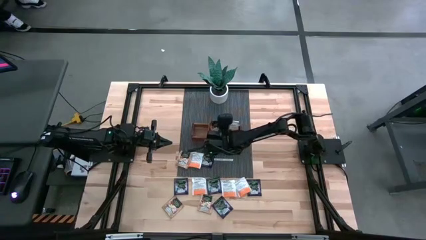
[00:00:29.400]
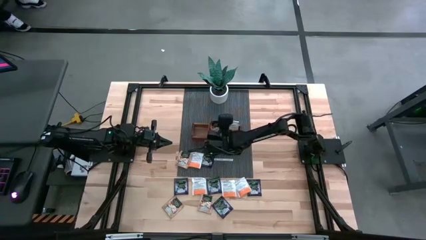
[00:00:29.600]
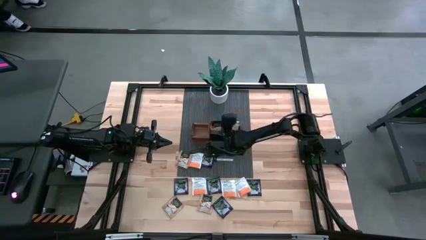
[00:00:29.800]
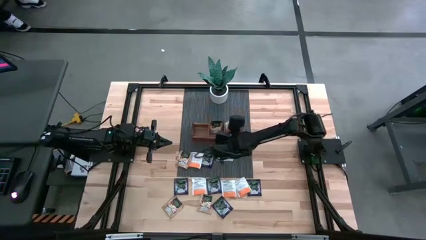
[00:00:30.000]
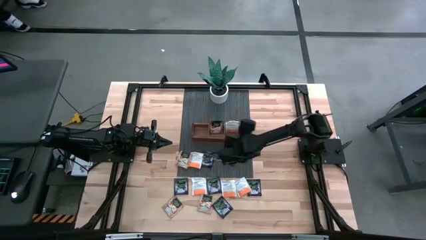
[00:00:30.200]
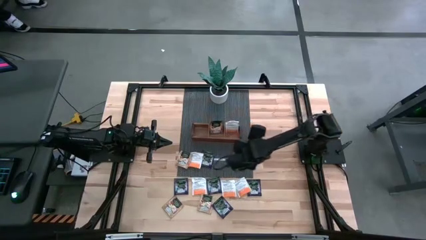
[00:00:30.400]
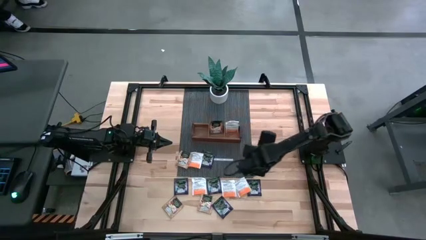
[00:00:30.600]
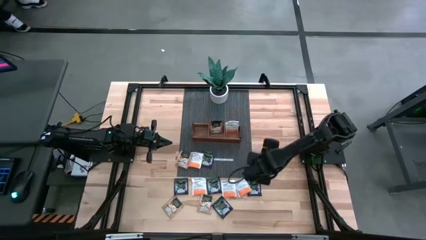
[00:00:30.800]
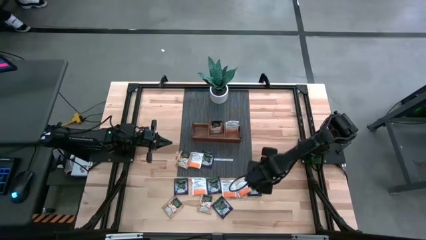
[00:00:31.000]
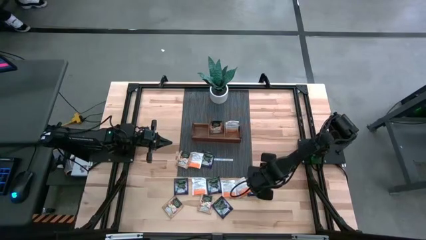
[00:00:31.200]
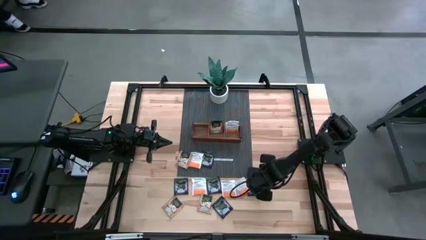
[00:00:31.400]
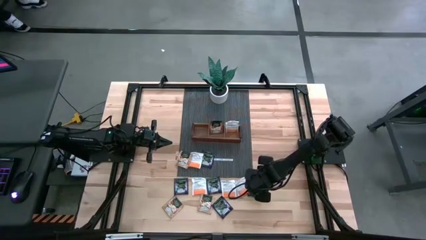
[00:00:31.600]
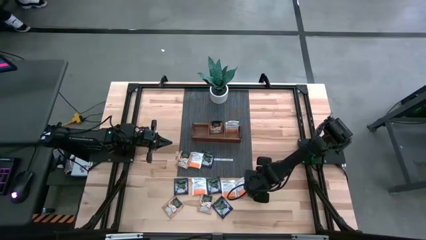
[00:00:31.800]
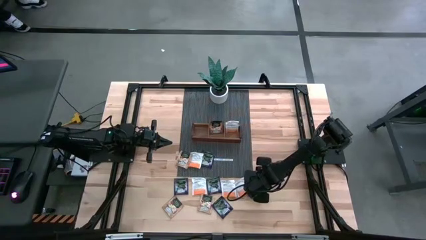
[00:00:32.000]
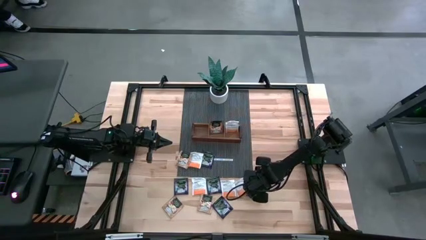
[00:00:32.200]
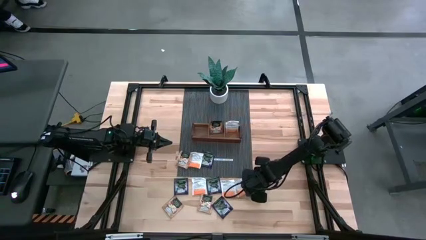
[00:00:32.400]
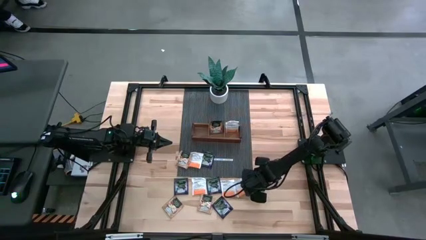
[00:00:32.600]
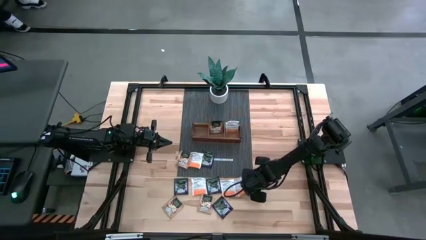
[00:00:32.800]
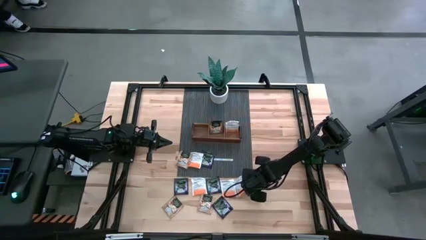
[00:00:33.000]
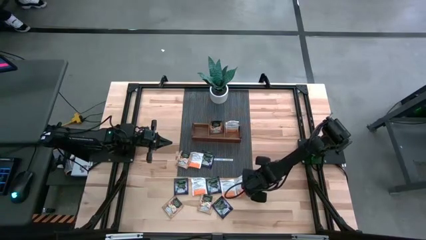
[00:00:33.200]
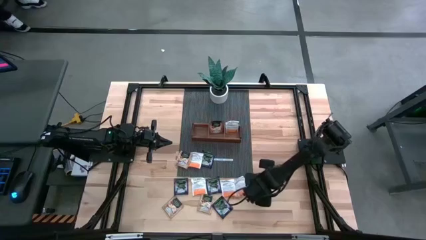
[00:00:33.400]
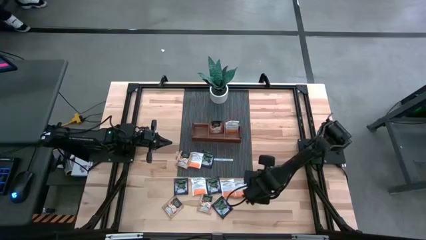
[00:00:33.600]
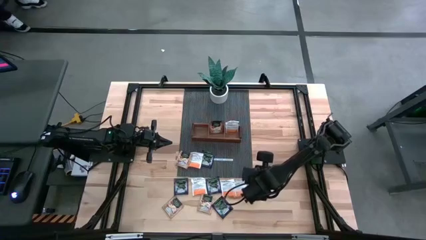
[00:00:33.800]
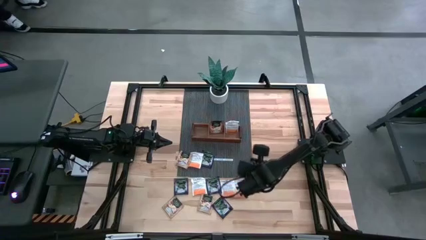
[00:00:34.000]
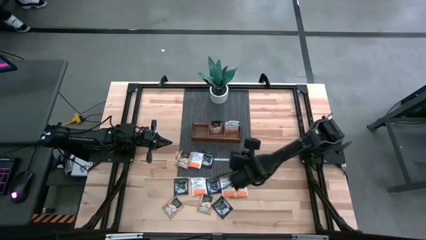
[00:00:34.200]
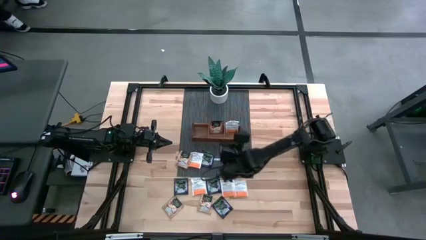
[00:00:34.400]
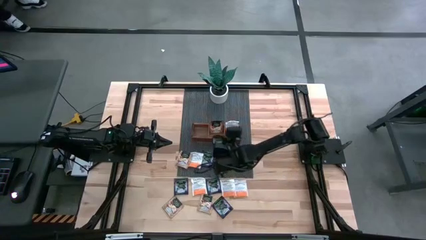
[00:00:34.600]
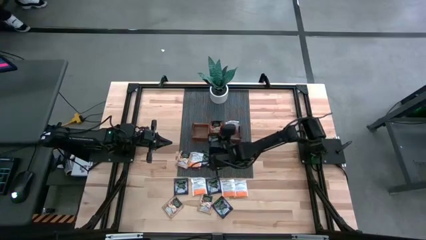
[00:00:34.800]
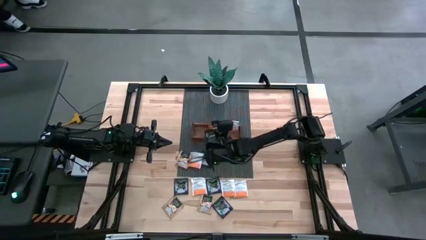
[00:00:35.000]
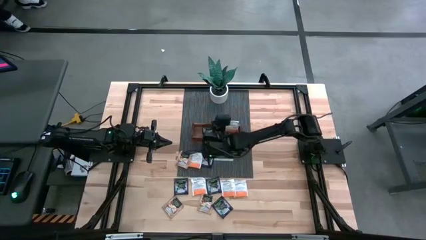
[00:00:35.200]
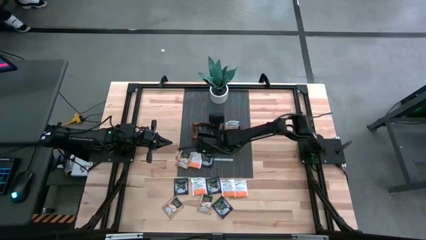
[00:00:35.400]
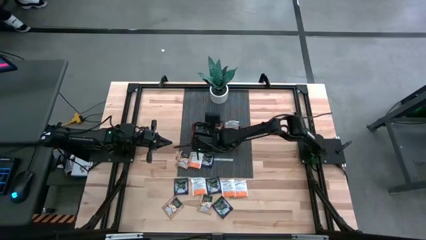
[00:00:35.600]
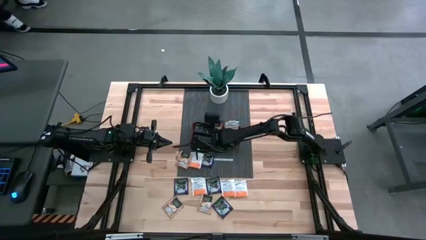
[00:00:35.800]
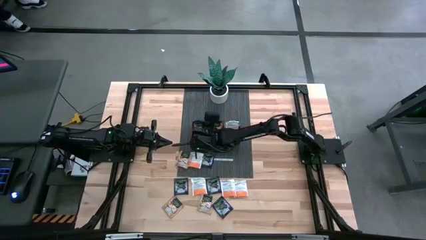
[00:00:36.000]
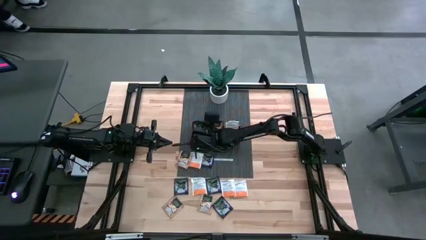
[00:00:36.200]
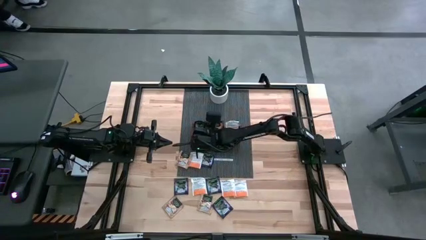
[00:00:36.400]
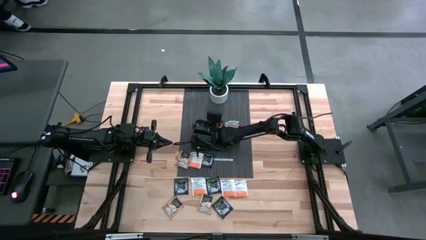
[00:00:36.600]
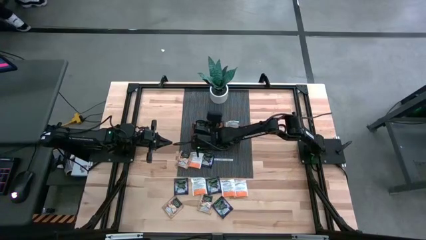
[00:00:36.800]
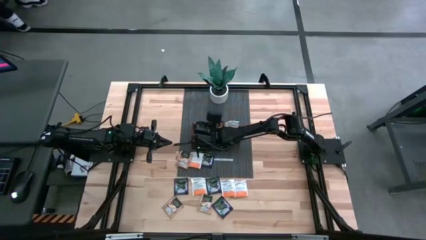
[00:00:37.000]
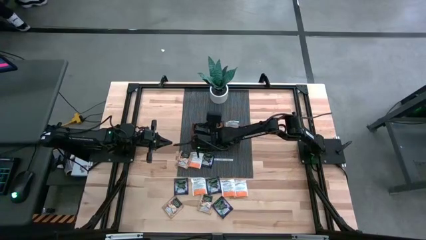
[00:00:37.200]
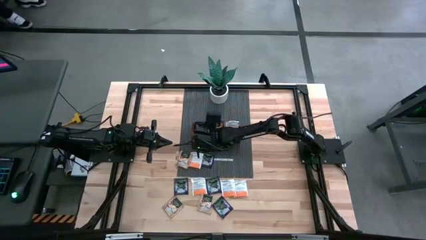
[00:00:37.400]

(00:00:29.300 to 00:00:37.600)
Task: Pick & Place Tea
Put the violet tea bag into the left section of the wooden organizer

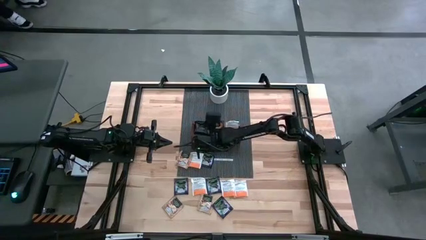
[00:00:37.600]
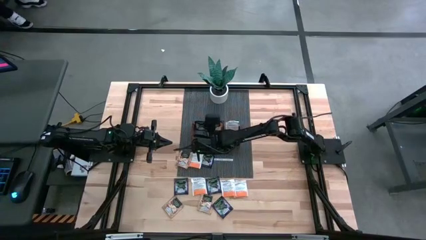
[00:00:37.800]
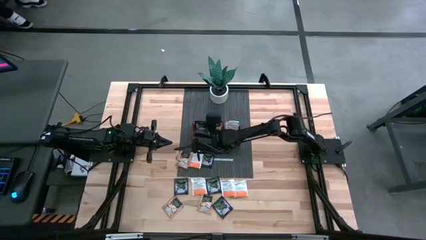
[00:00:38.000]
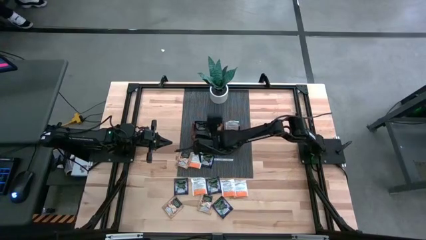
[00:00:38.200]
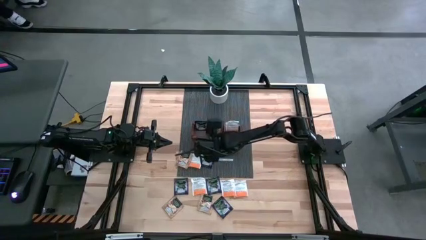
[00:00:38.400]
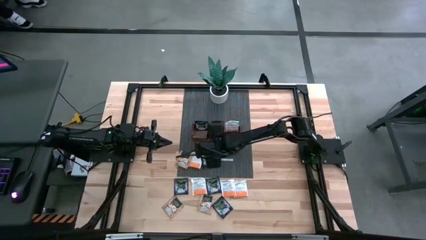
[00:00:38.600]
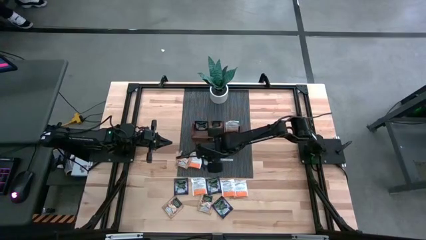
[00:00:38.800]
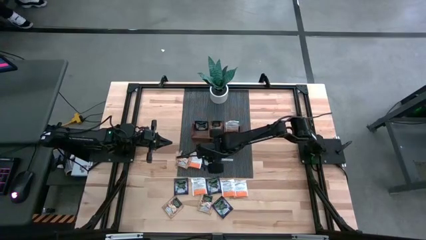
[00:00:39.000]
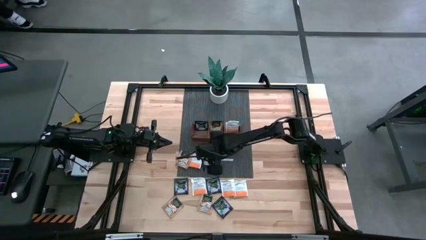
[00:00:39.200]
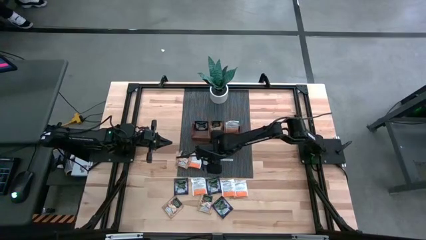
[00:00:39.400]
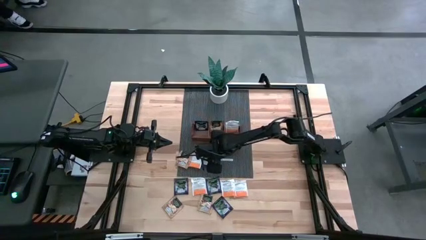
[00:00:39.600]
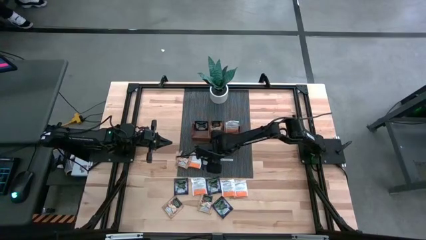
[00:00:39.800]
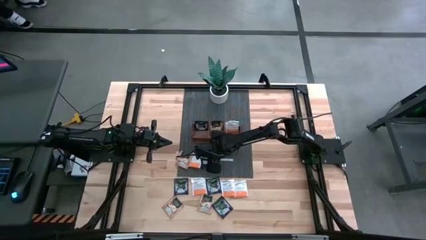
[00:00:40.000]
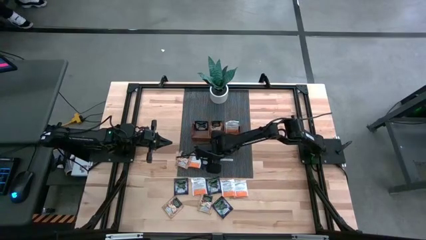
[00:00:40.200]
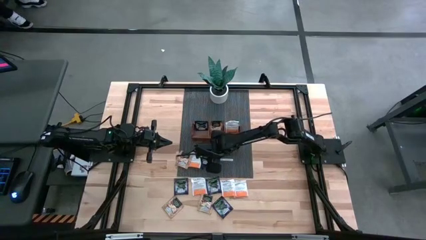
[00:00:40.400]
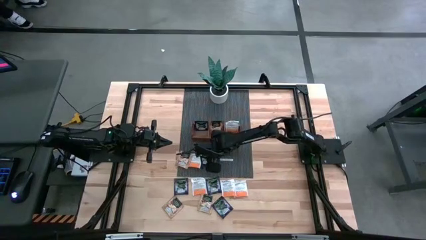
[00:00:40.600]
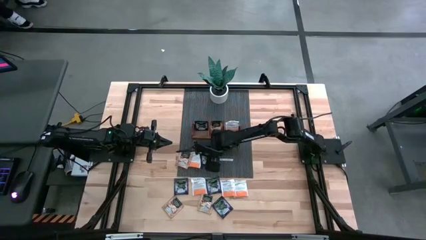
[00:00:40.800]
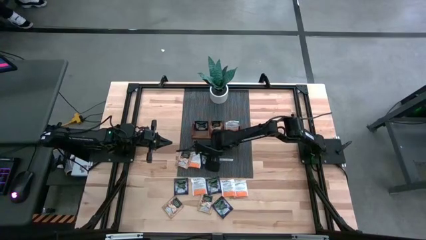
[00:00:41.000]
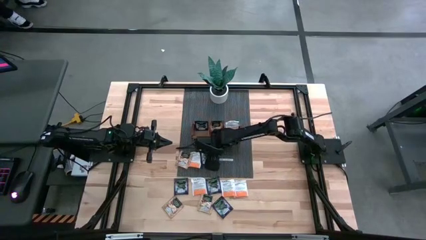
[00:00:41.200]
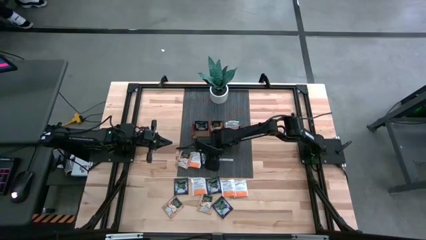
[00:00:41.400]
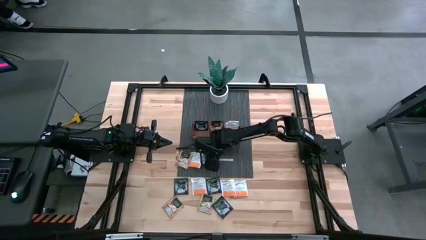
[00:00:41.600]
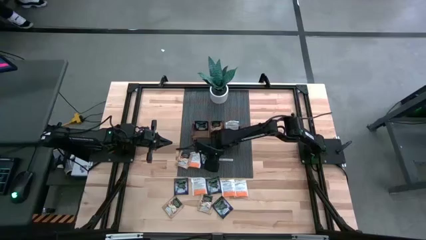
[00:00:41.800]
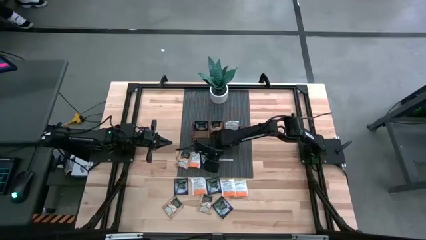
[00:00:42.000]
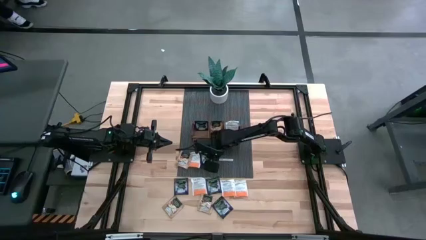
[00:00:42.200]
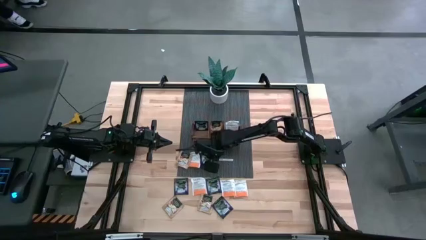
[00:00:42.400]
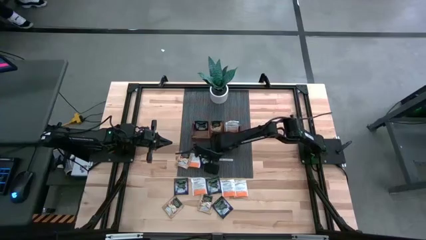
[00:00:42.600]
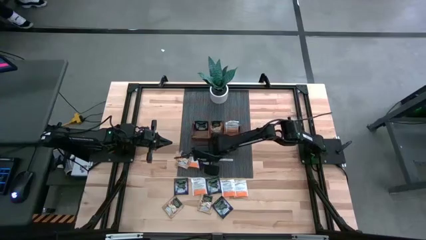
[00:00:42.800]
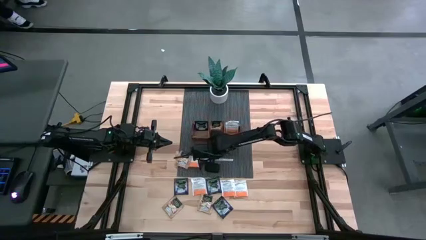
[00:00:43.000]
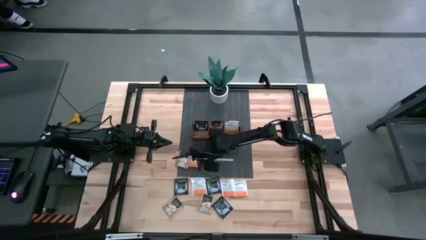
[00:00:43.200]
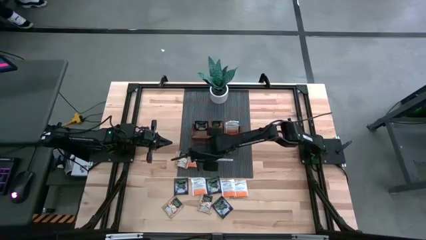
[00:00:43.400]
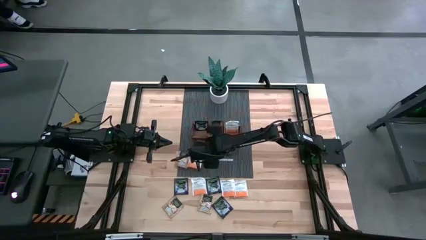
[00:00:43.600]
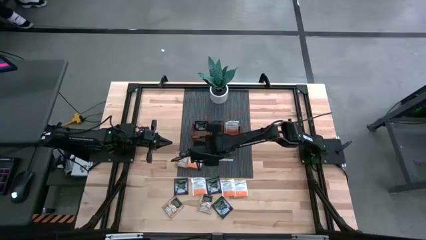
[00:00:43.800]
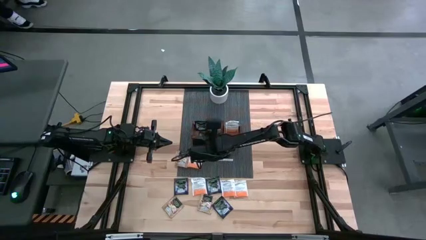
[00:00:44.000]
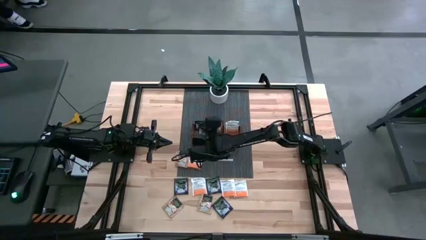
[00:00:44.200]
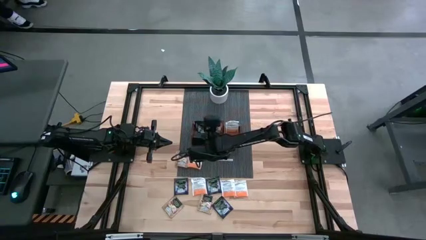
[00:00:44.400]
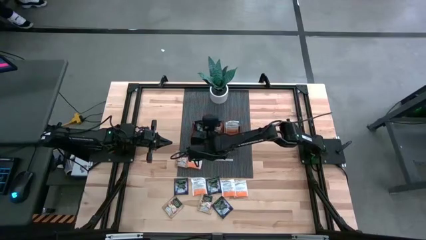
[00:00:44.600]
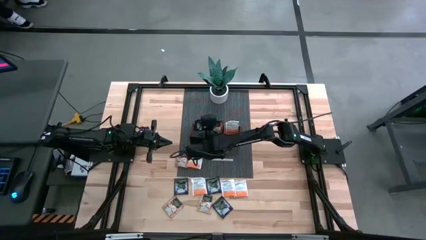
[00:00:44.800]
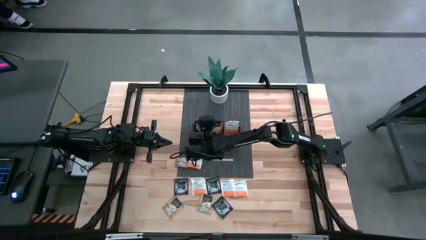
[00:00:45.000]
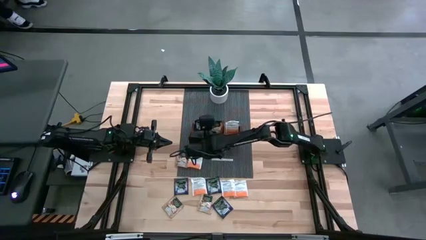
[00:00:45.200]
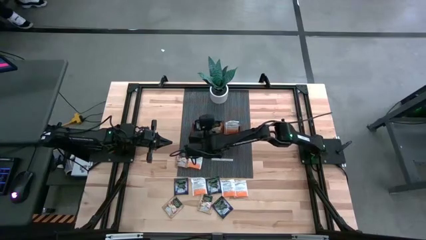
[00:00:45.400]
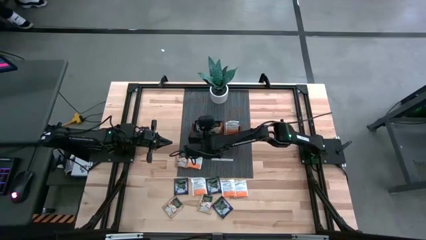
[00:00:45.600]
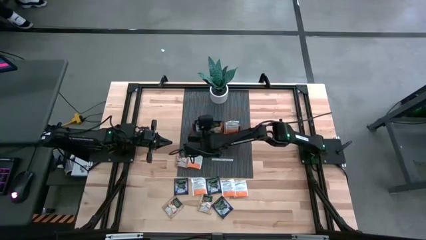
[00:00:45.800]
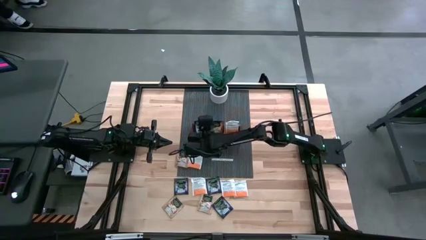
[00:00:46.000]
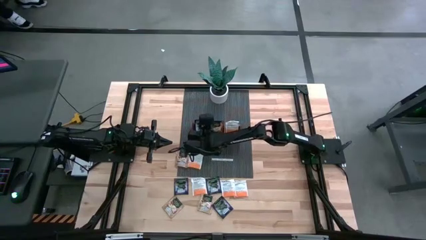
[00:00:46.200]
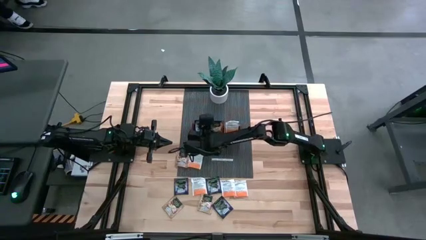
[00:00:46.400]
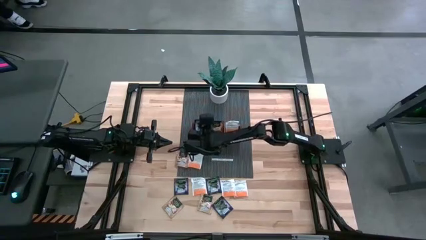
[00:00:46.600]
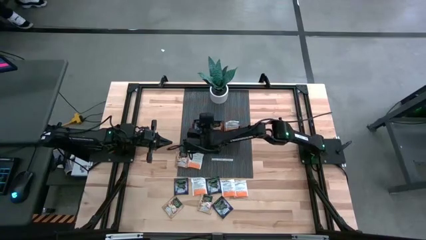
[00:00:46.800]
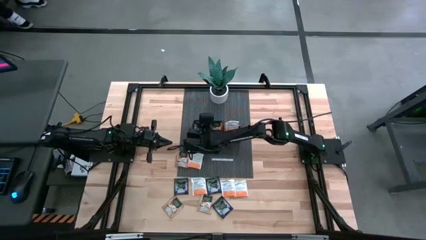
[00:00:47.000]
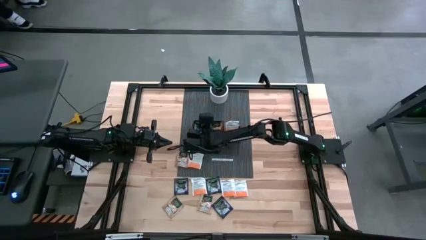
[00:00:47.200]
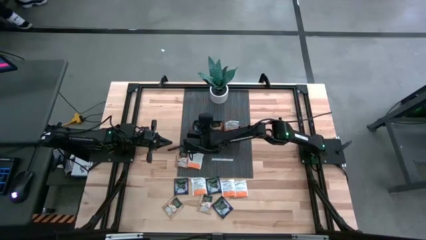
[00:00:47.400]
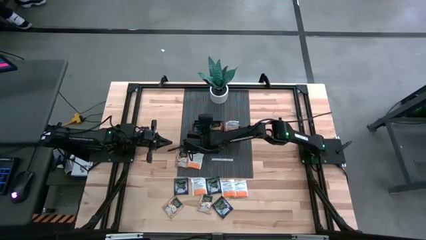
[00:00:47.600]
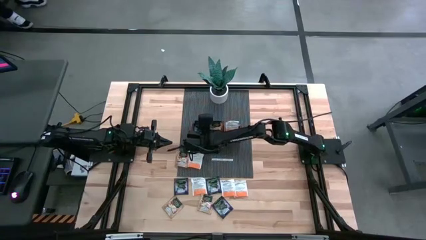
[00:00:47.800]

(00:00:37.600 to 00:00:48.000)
Put the violet tea bag into the left section of the wooden organizer
